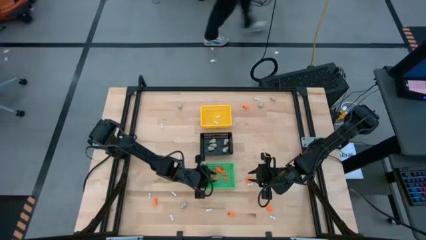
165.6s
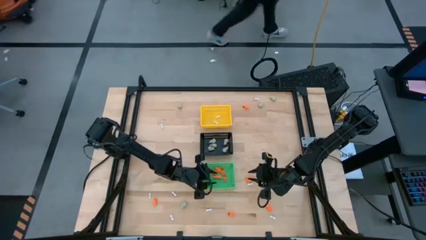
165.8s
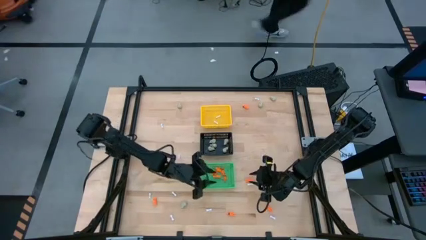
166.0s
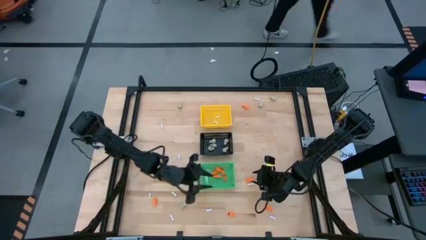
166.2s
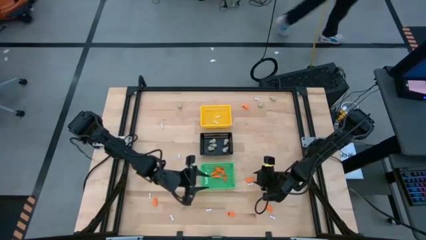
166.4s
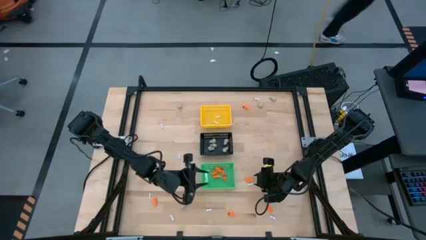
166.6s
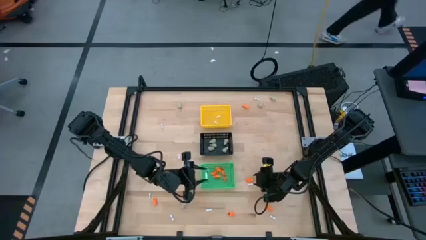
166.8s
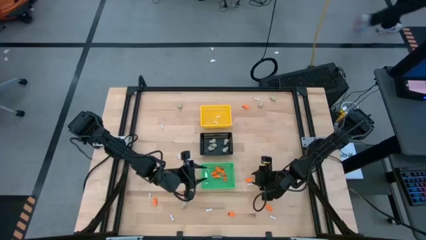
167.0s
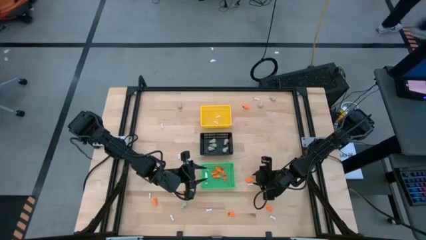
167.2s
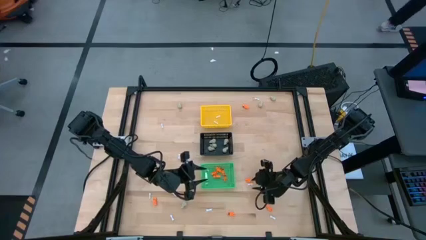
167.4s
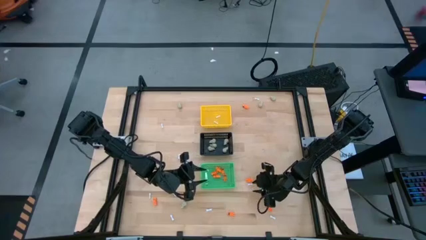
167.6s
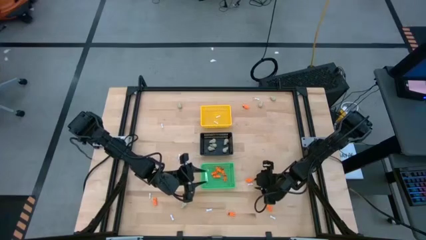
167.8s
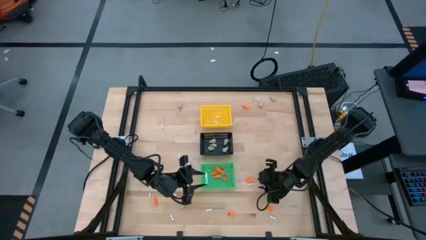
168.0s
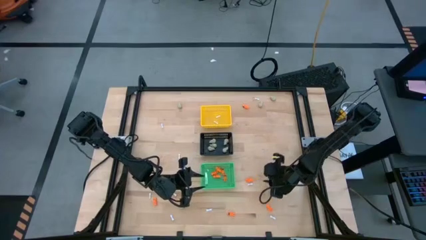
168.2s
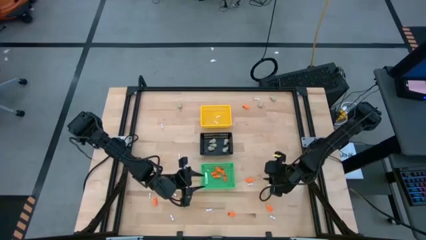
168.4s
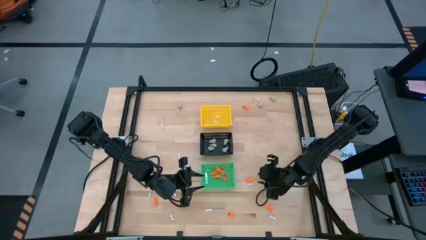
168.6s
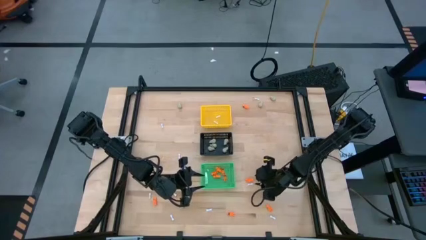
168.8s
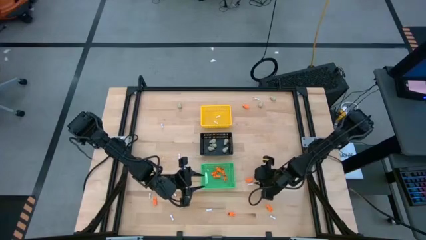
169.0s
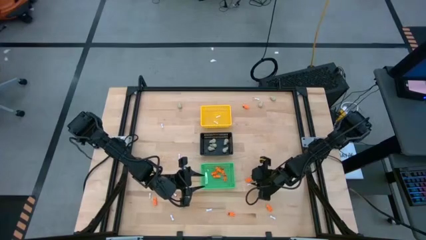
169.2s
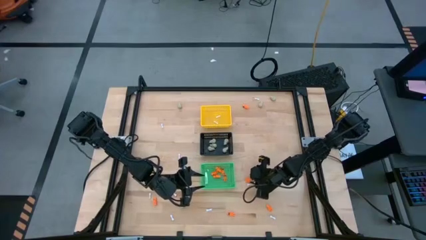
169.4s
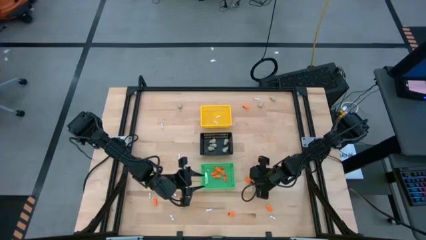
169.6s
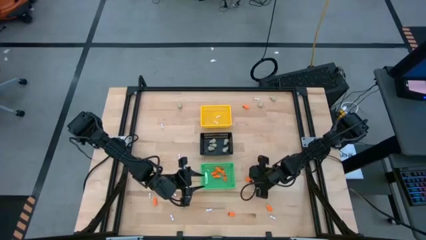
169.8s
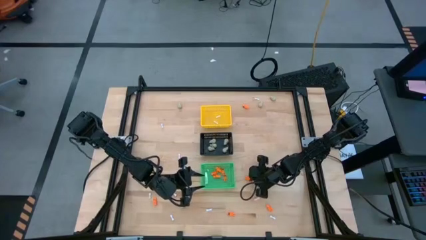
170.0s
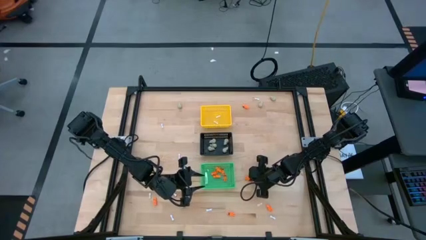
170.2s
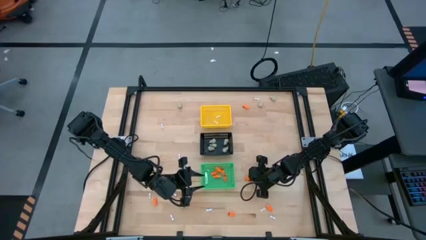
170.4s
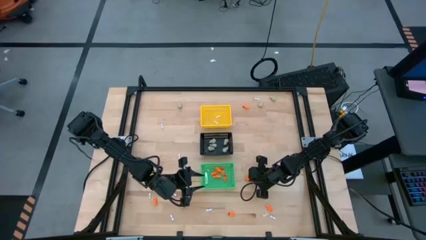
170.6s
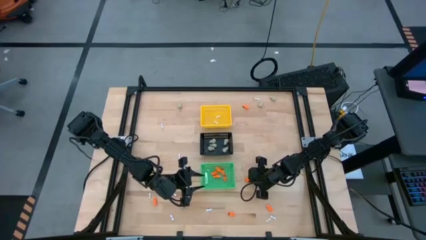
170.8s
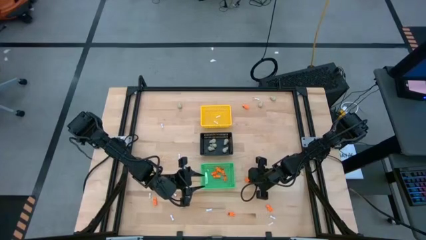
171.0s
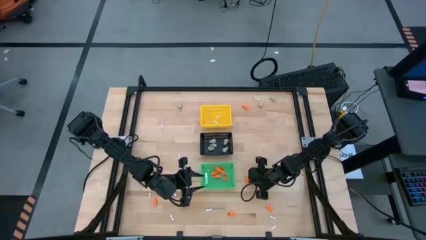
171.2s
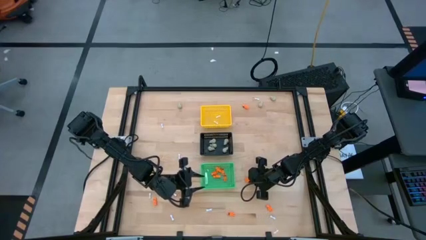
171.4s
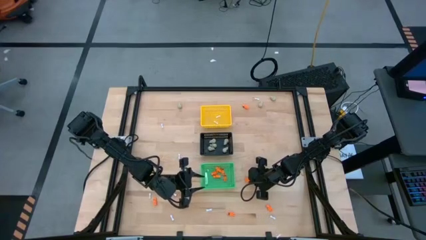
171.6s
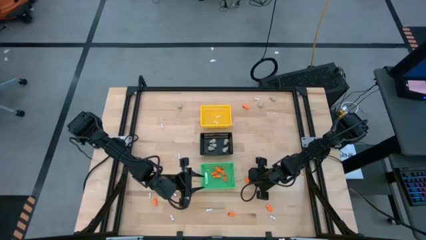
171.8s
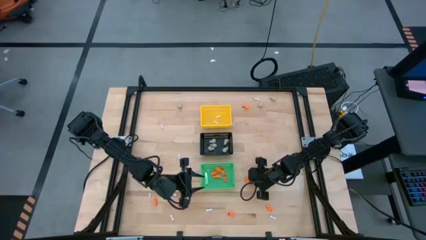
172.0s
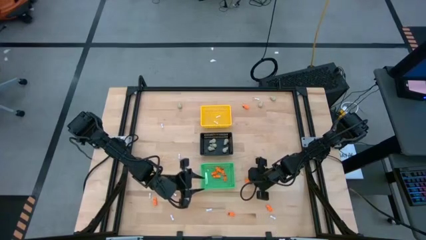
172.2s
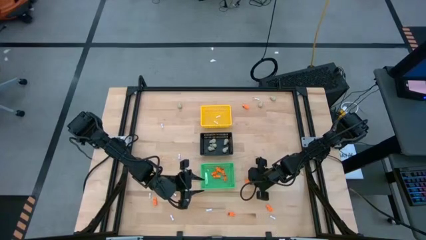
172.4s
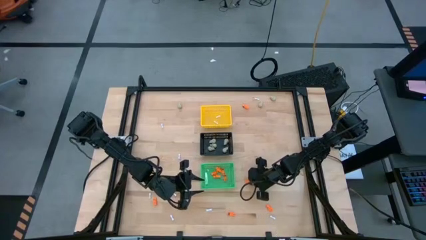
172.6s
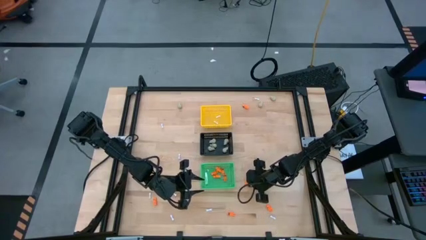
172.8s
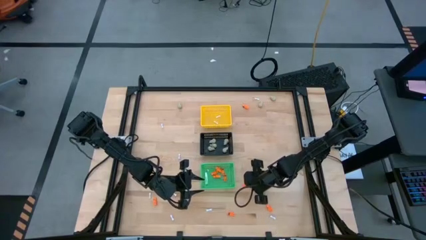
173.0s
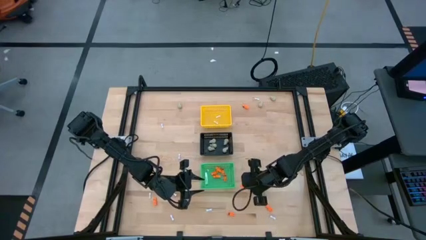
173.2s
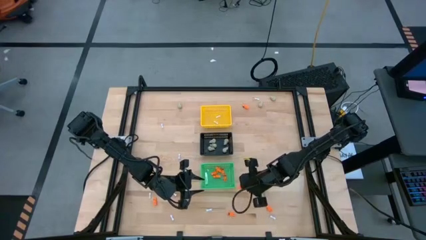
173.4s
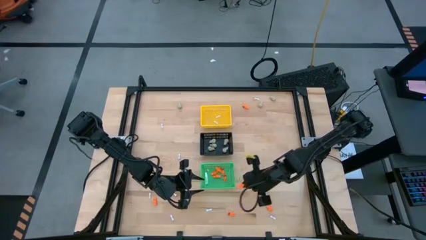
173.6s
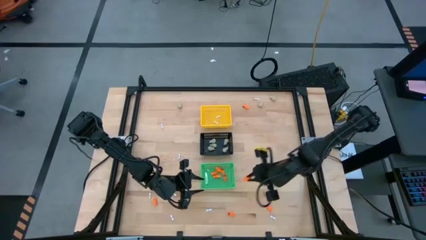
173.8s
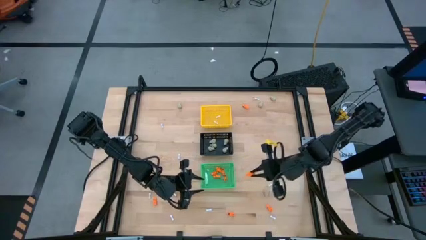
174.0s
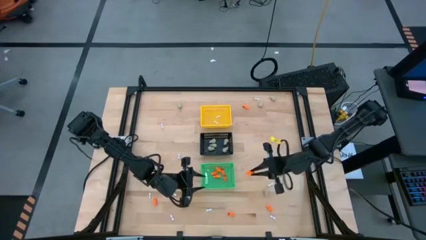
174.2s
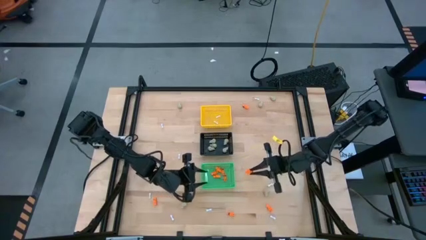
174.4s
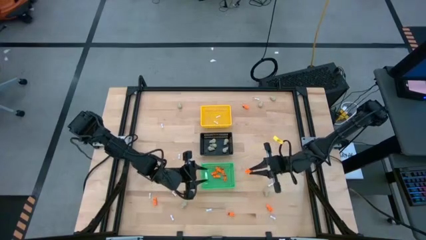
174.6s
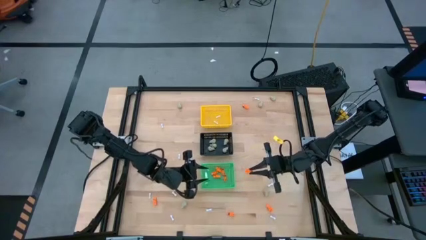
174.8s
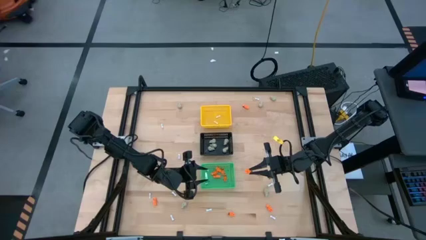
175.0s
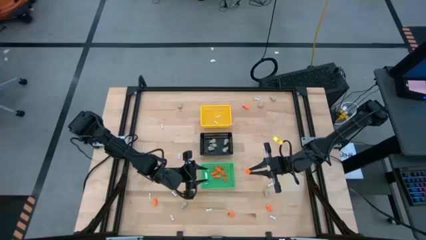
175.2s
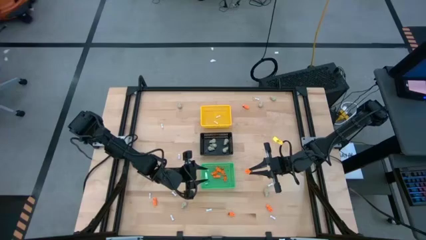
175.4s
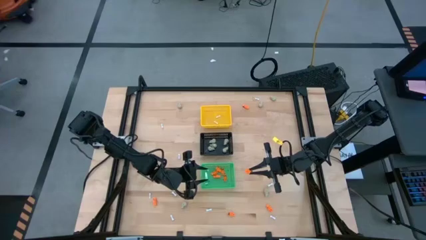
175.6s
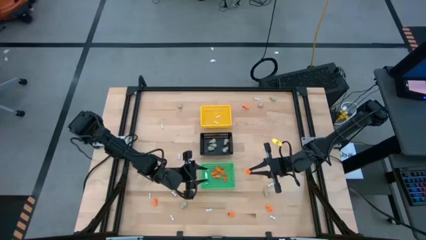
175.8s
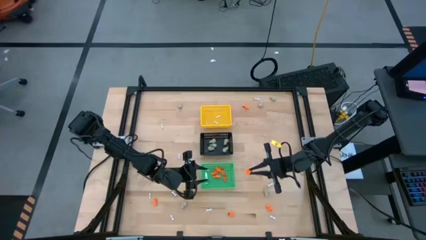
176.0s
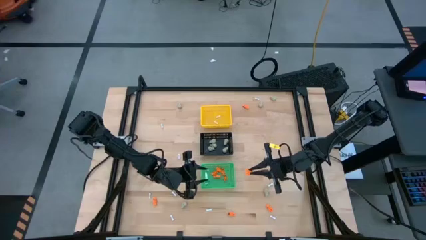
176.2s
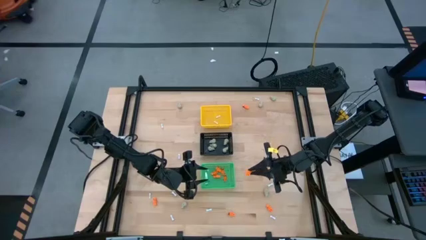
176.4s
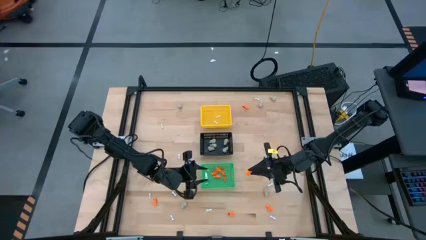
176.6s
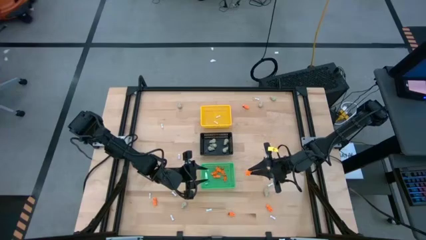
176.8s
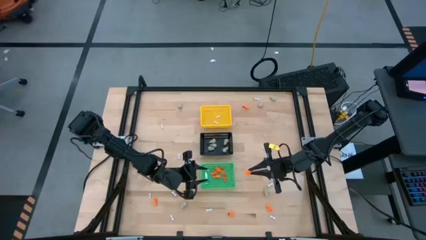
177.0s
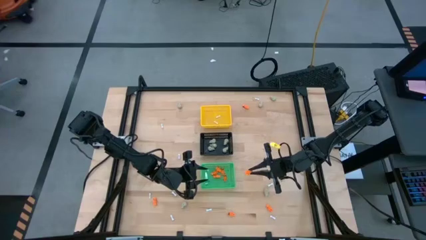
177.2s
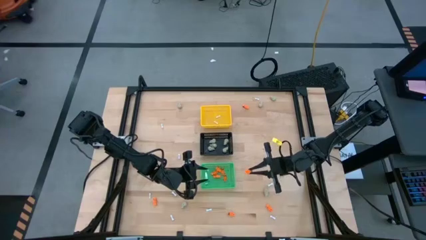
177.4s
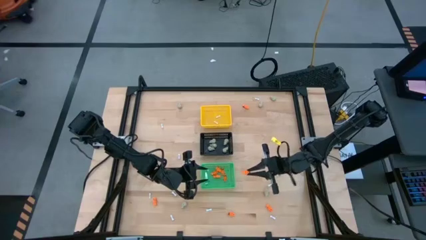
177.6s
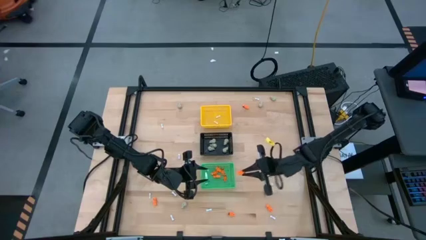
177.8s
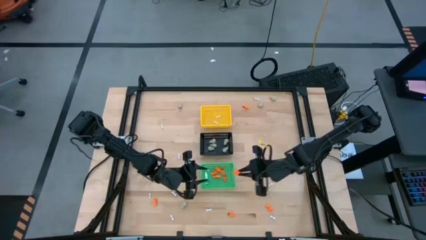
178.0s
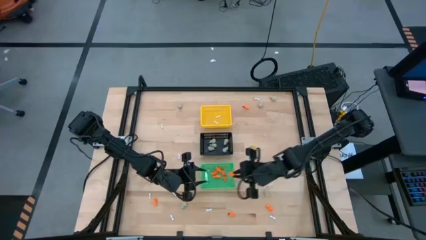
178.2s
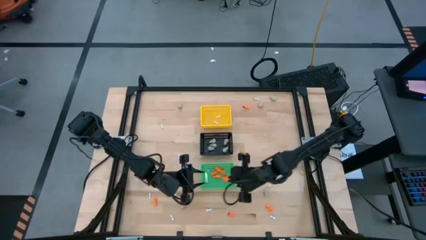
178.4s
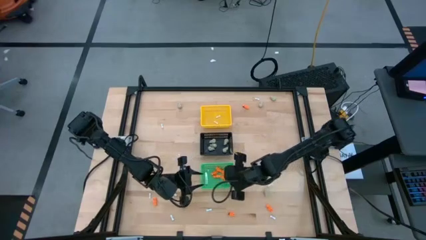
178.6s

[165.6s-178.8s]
Task: Sort Halloween decoration
Put the orange skeleton toy into the green basket
